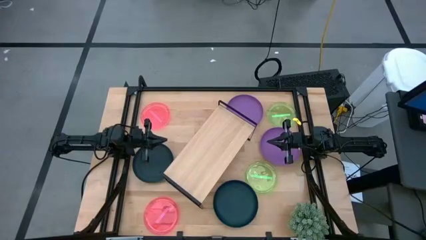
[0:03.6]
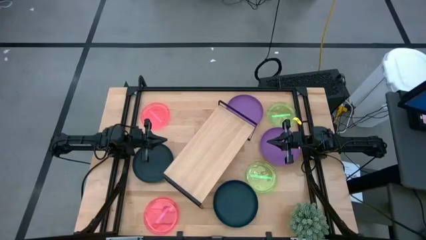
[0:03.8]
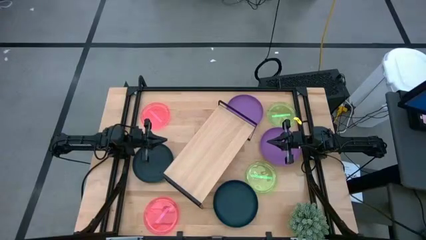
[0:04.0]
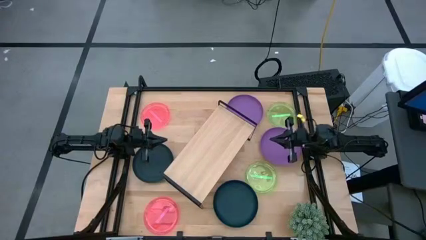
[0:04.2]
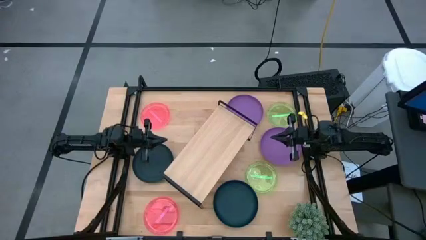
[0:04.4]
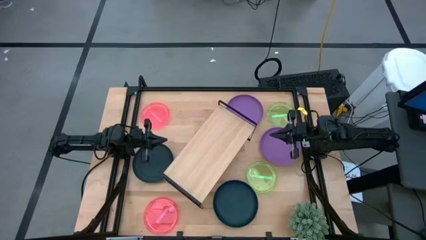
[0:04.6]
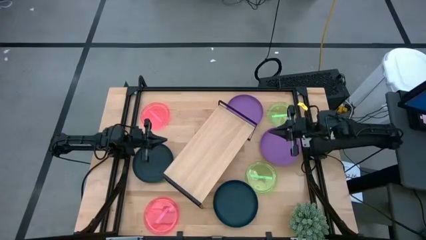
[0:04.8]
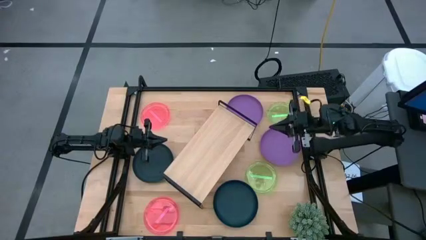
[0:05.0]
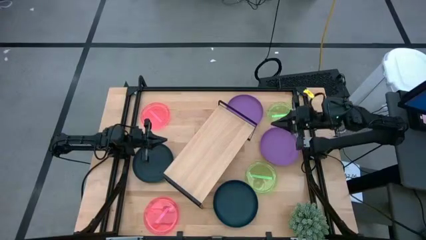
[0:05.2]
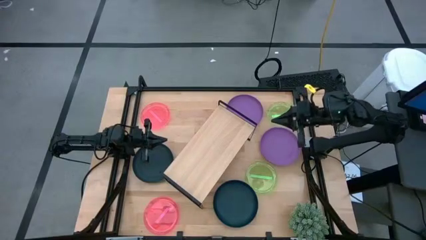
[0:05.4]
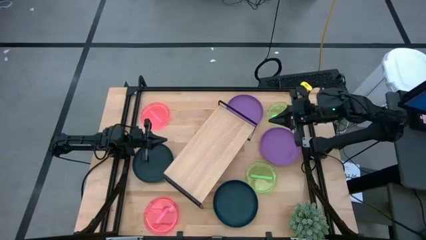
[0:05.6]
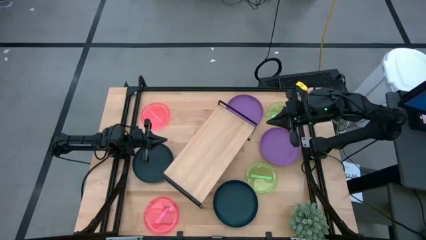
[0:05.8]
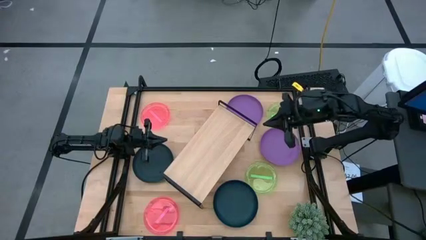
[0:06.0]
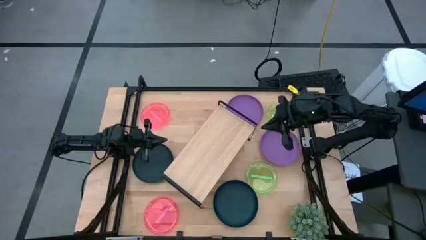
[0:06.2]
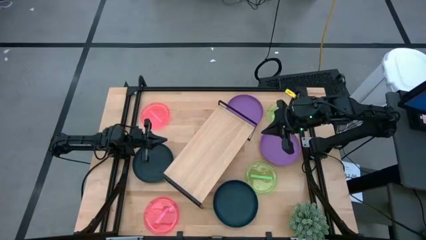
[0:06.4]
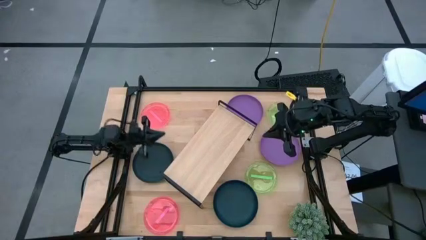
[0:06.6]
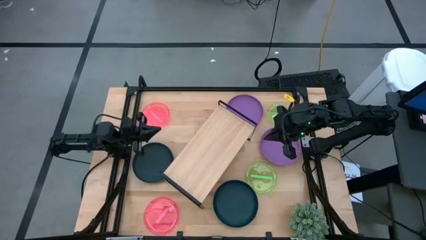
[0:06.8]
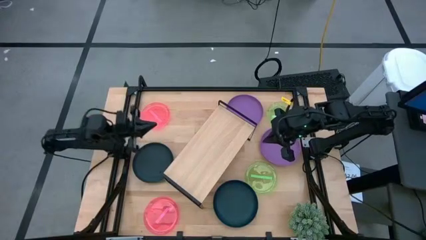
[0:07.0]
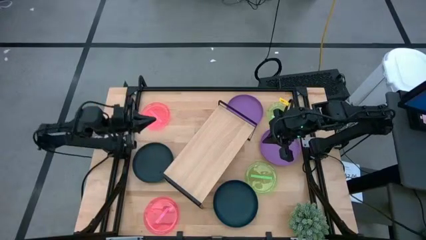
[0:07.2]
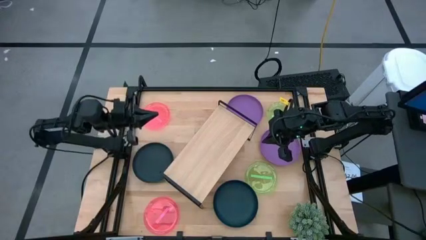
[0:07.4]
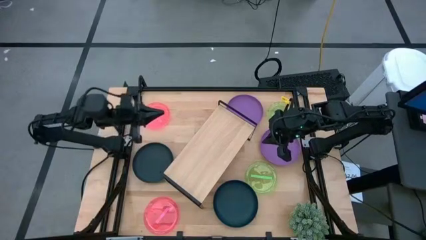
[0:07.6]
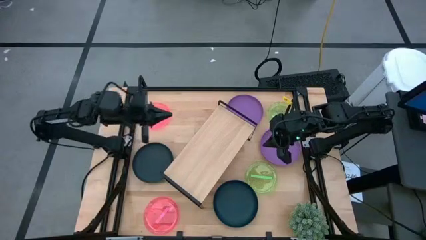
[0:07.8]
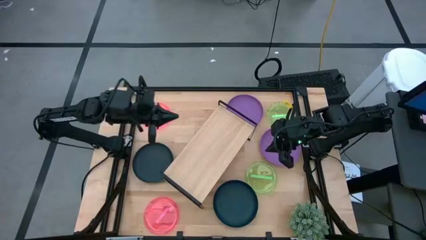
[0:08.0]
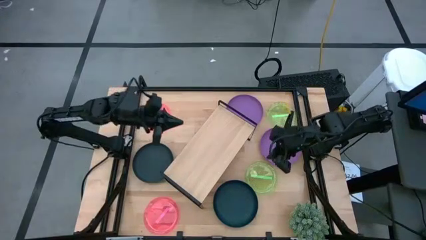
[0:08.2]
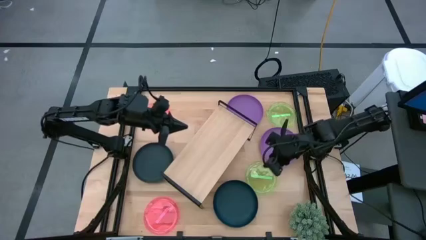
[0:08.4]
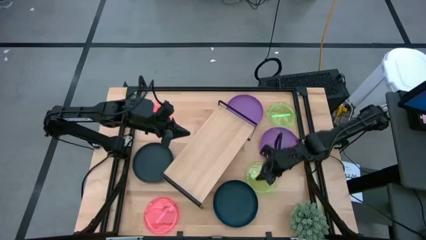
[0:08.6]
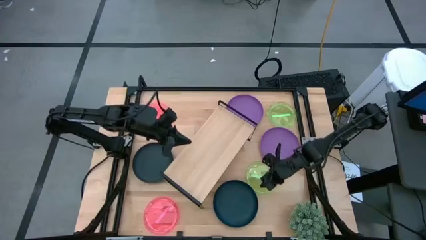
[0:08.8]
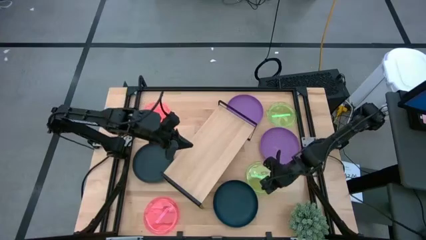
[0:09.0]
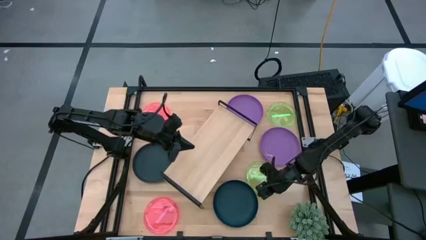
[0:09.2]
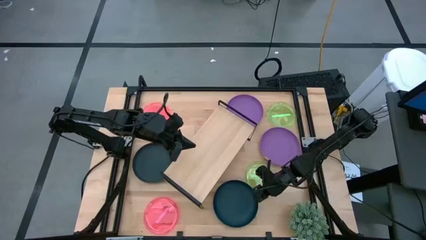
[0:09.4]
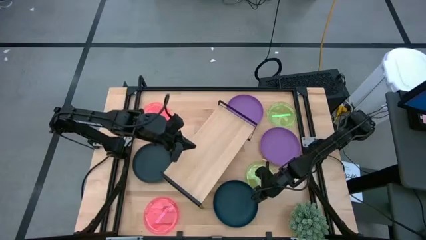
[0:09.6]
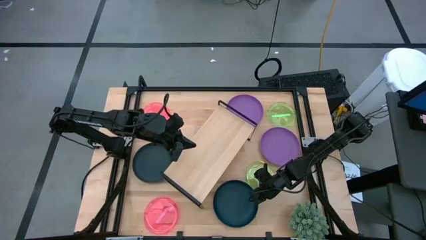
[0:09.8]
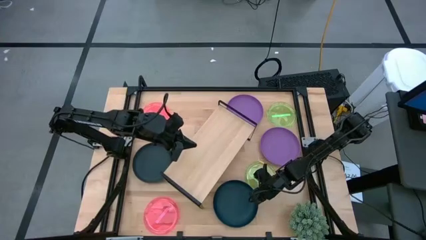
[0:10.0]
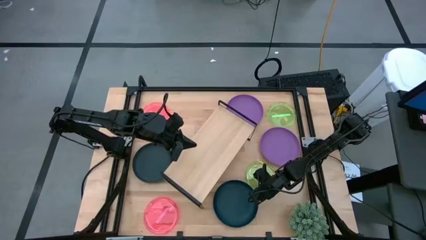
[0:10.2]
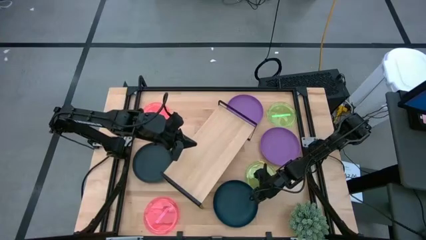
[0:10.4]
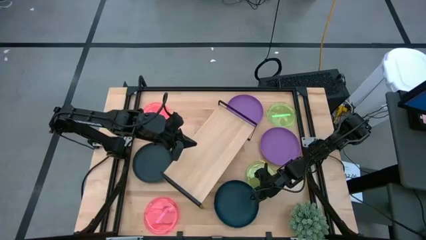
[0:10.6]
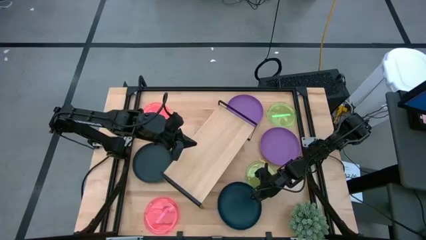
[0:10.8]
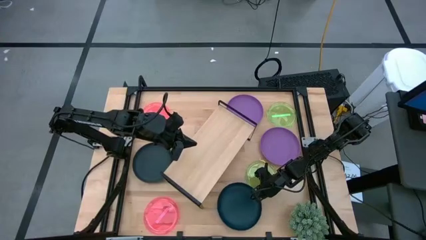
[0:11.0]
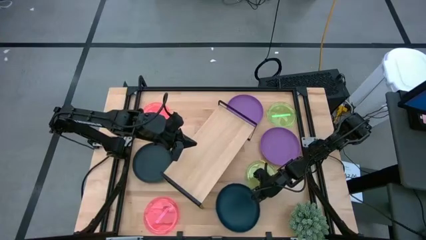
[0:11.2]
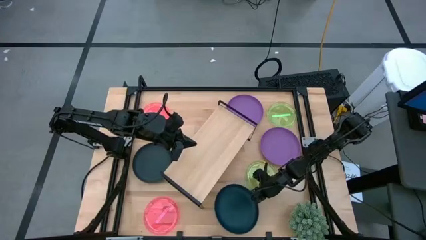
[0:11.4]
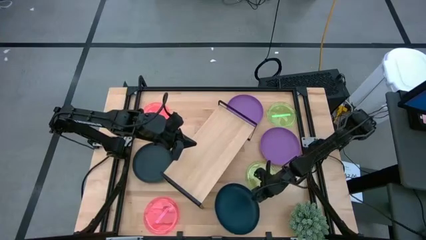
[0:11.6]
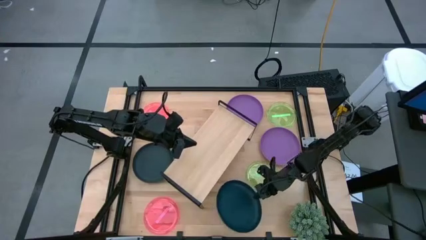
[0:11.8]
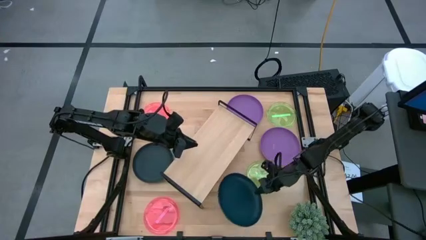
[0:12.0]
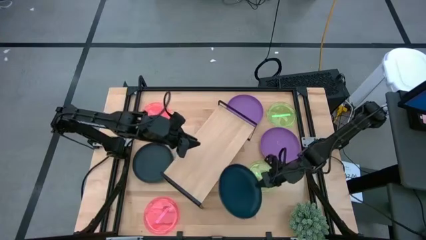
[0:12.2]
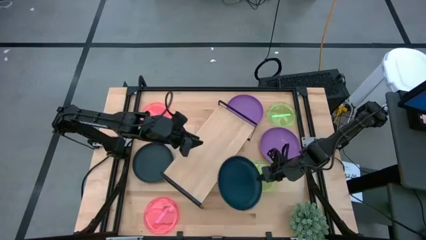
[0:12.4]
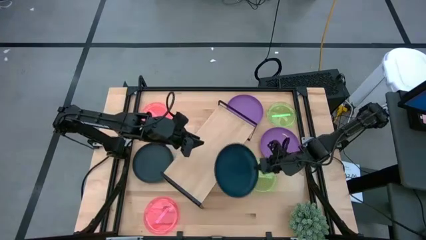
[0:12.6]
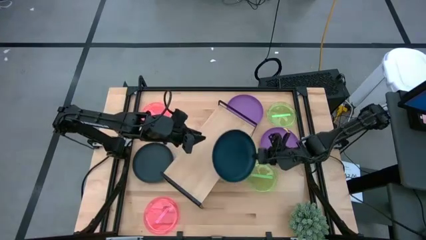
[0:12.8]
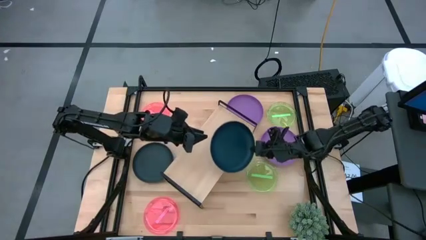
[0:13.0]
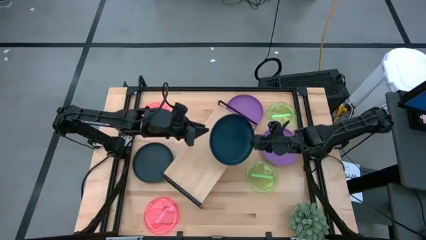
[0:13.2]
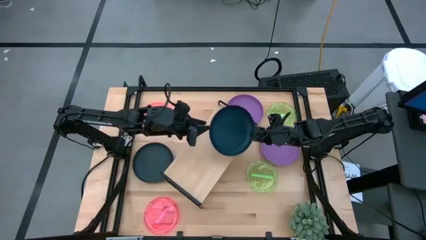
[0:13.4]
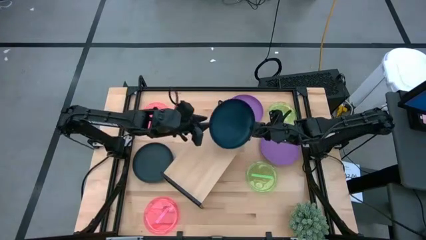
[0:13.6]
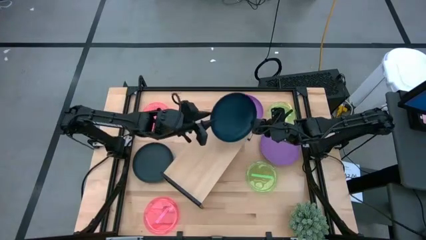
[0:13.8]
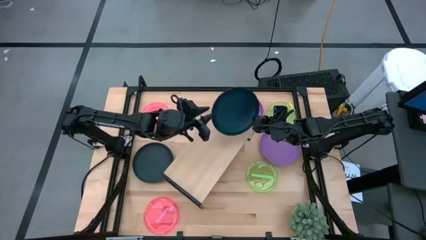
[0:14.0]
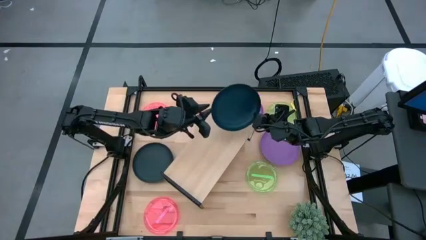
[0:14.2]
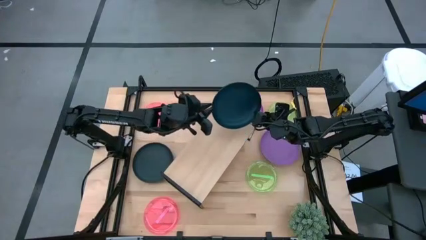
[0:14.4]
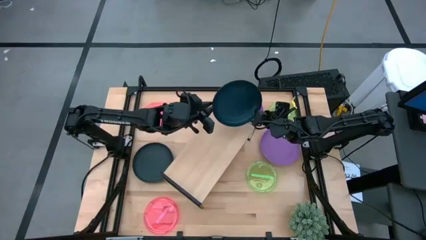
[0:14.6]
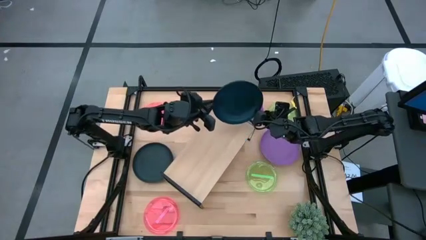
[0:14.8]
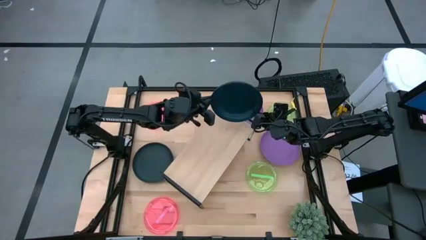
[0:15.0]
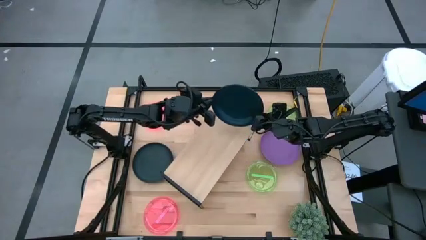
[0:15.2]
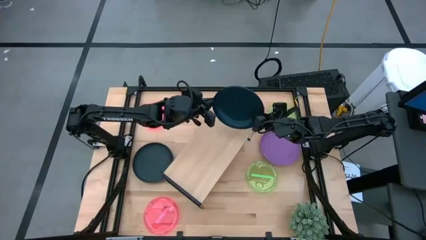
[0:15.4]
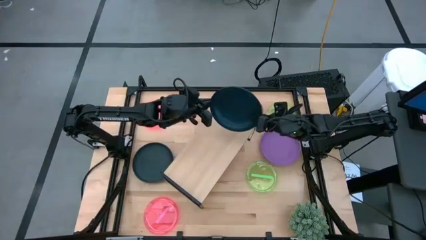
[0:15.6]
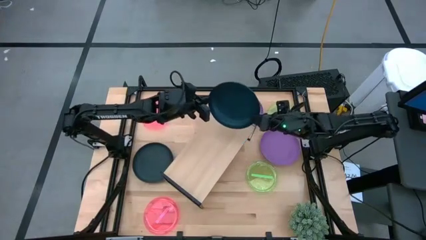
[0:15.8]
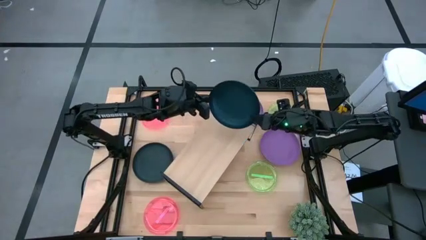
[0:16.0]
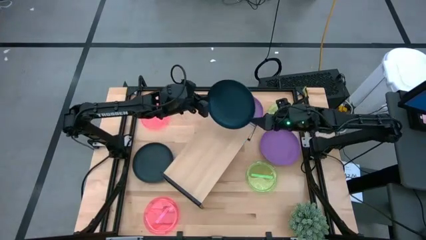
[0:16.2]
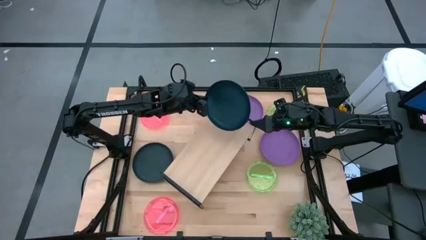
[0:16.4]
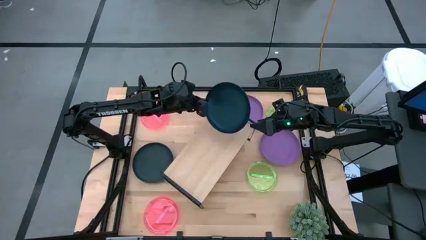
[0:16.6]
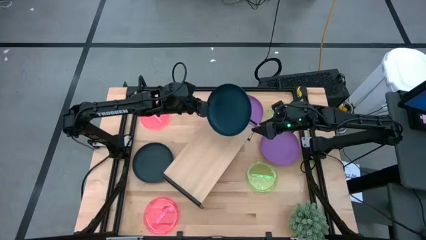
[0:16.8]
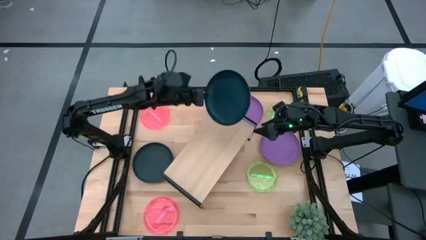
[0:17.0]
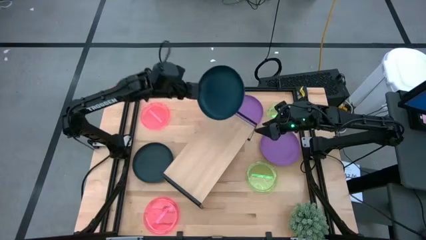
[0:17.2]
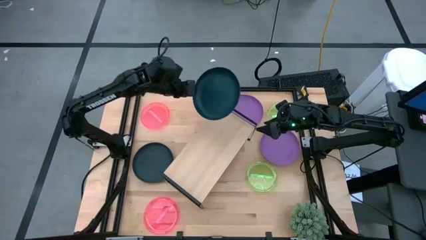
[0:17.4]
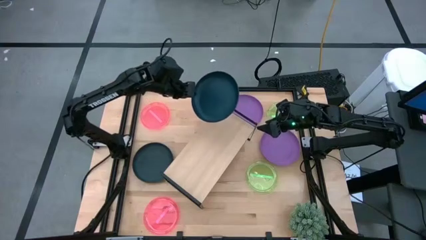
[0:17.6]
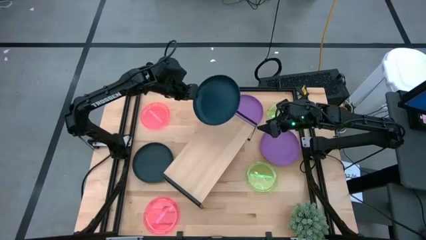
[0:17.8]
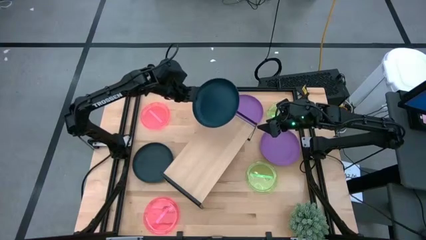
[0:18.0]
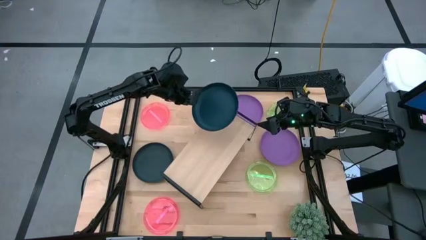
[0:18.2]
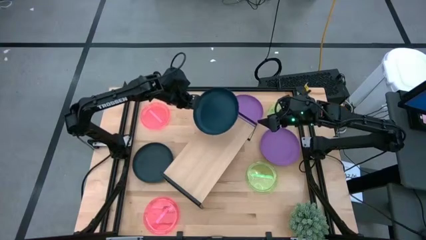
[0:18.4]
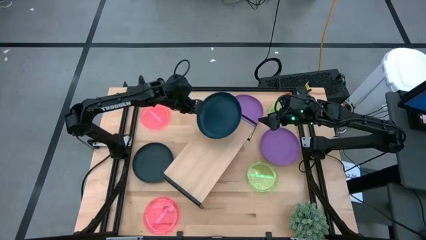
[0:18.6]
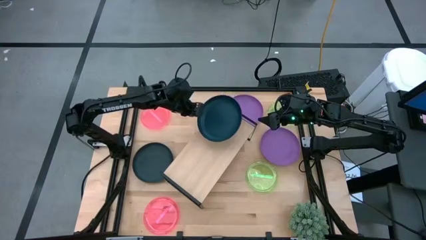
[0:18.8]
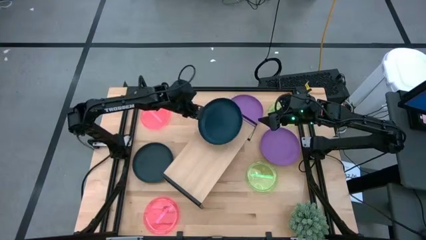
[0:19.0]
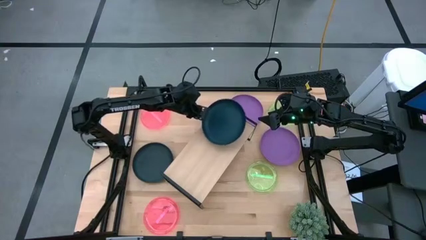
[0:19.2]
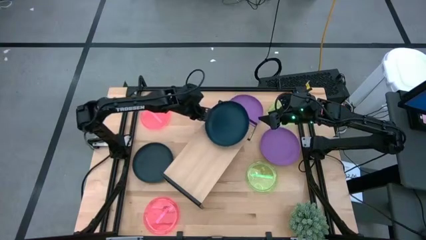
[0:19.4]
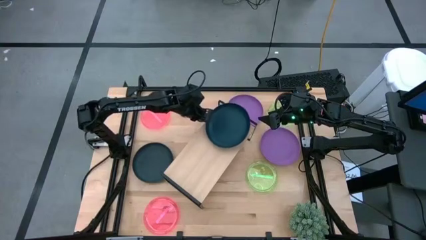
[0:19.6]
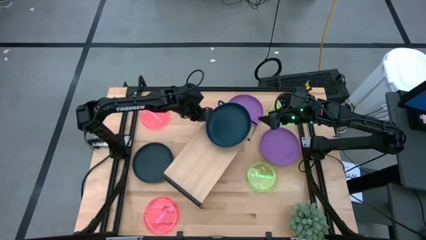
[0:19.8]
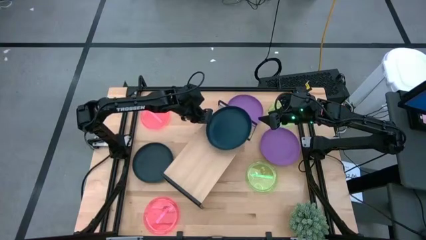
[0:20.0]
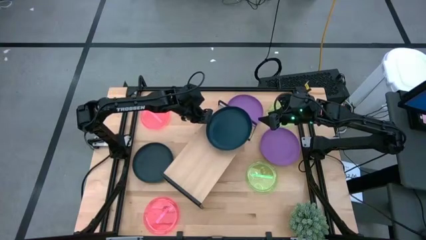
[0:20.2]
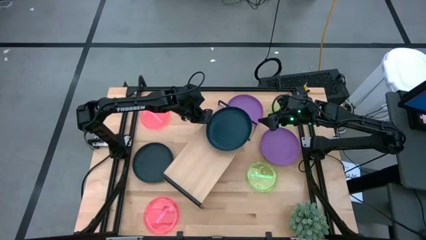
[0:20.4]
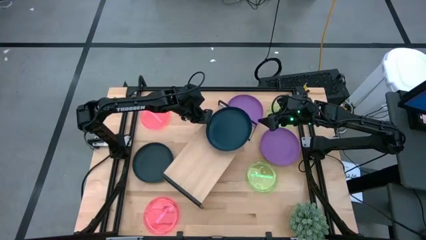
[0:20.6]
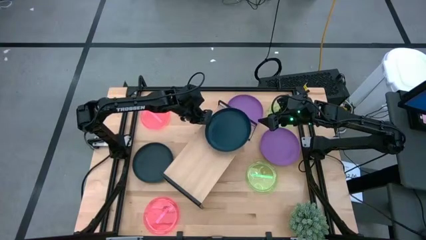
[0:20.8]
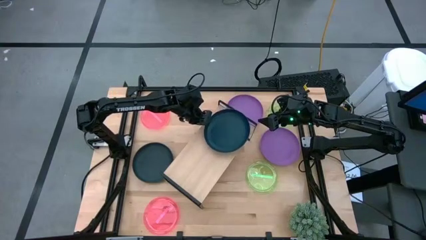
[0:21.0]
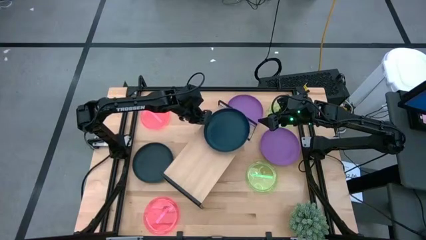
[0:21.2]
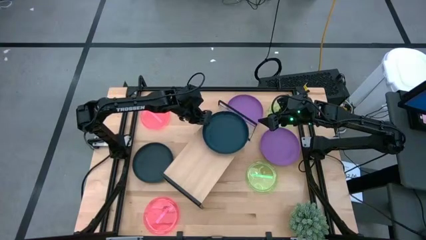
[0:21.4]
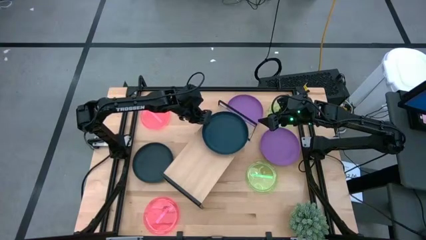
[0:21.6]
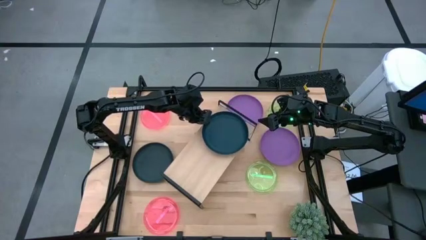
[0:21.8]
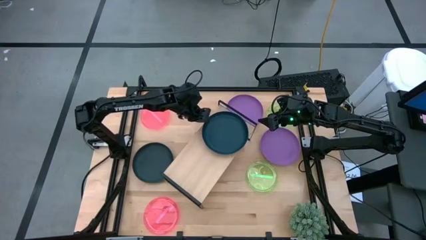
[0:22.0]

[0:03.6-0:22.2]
Task: Place and stack plates onto a shelf
Put the right black plate on the shelf
